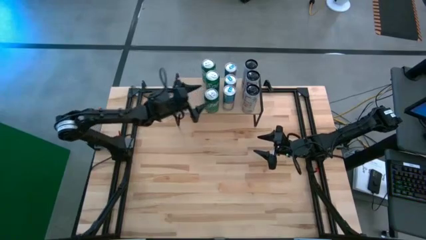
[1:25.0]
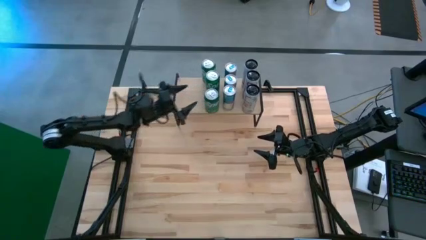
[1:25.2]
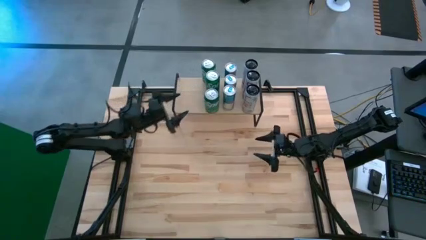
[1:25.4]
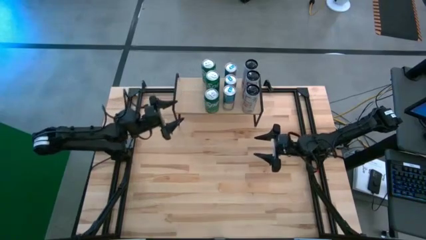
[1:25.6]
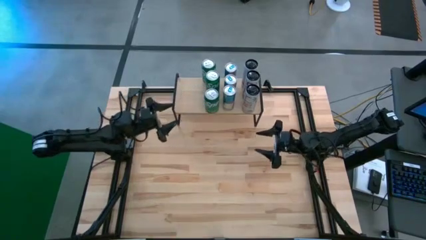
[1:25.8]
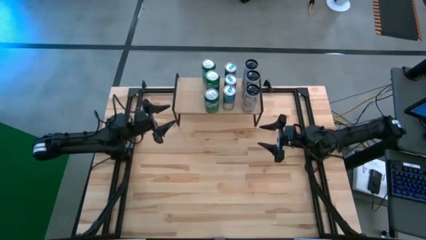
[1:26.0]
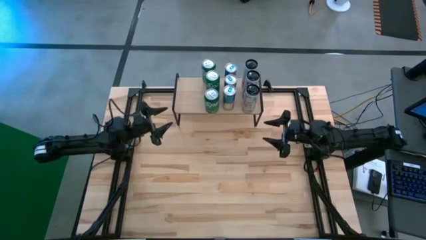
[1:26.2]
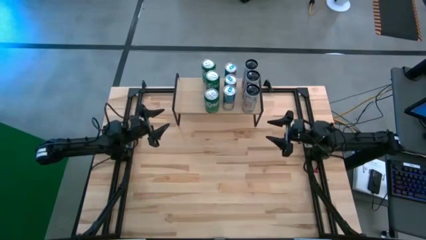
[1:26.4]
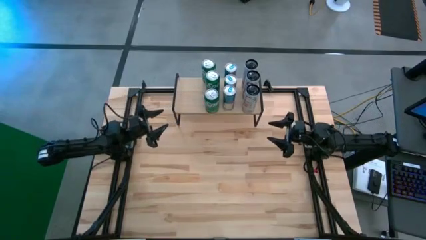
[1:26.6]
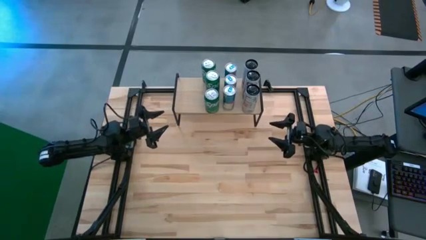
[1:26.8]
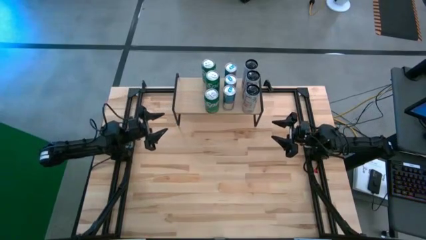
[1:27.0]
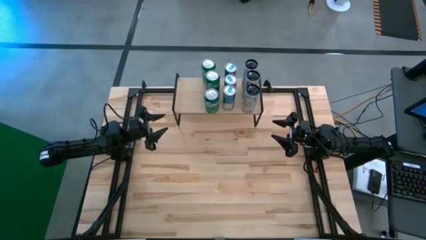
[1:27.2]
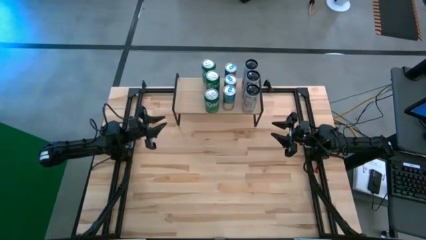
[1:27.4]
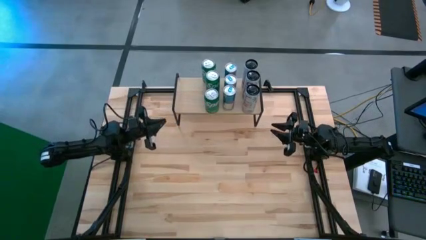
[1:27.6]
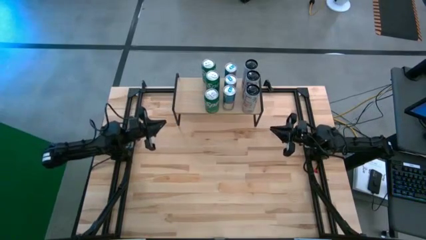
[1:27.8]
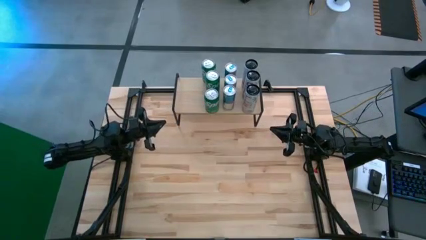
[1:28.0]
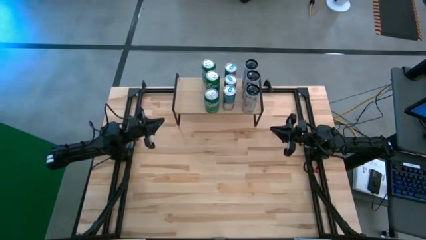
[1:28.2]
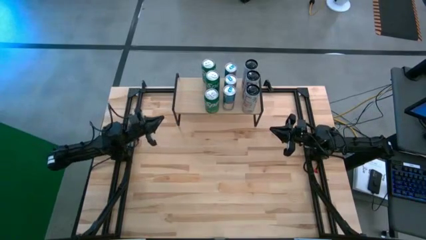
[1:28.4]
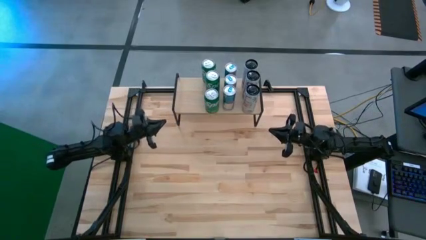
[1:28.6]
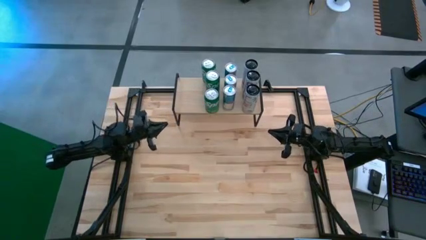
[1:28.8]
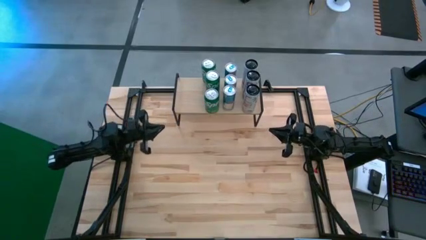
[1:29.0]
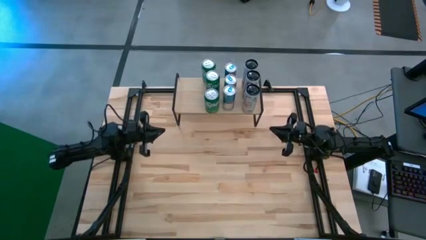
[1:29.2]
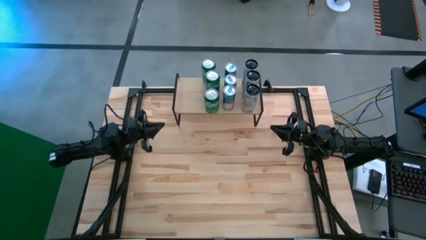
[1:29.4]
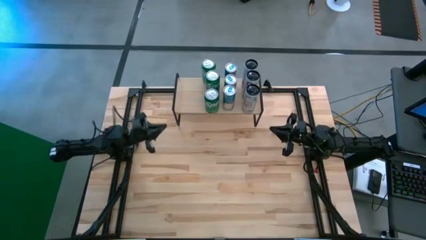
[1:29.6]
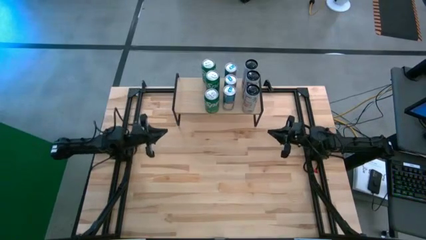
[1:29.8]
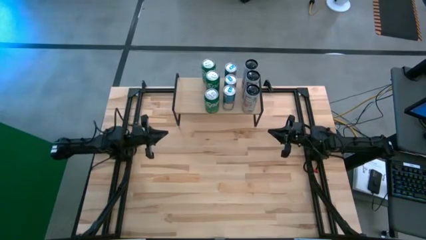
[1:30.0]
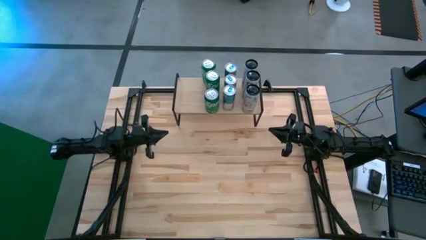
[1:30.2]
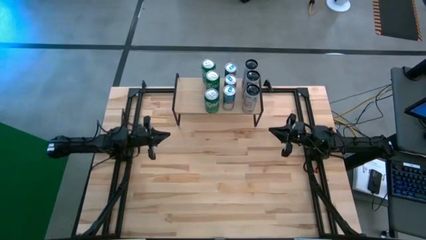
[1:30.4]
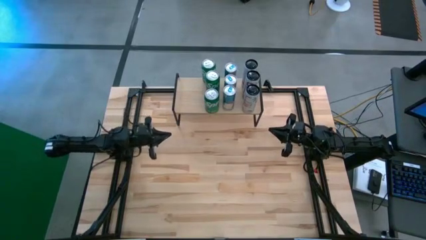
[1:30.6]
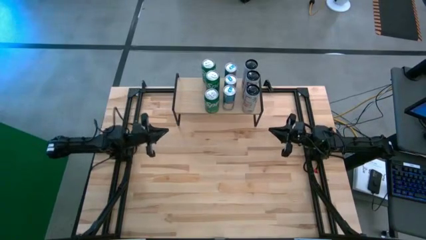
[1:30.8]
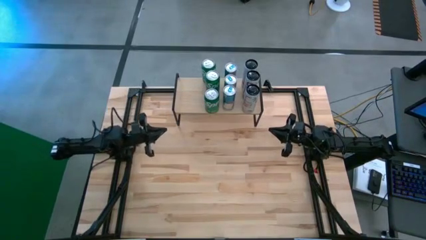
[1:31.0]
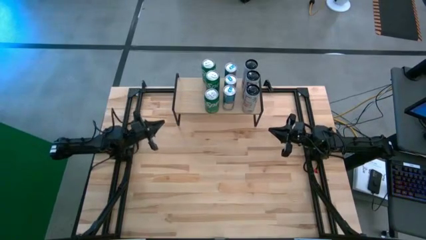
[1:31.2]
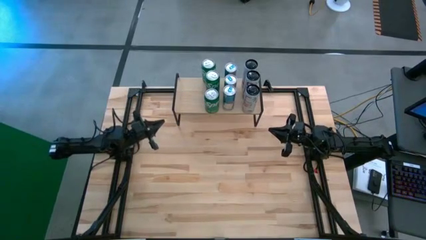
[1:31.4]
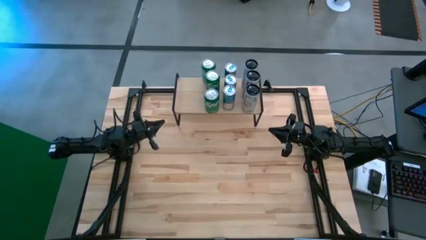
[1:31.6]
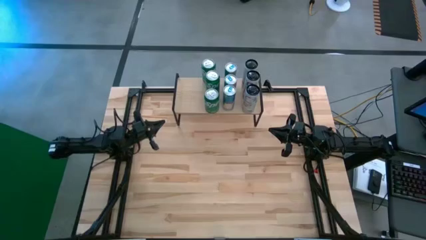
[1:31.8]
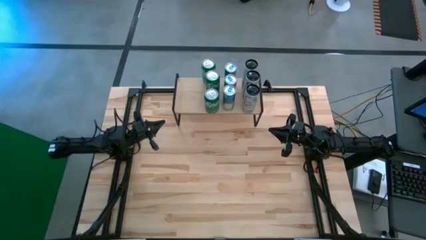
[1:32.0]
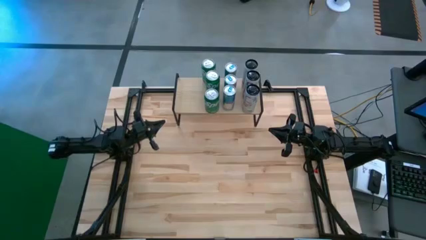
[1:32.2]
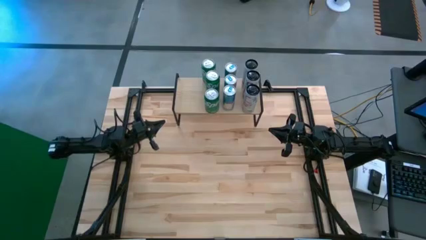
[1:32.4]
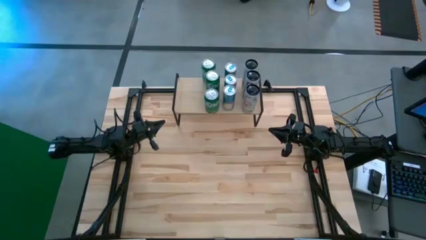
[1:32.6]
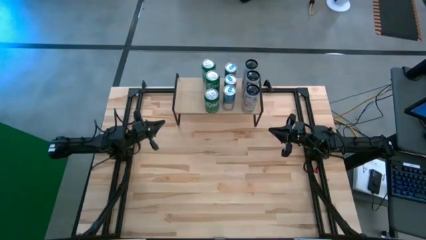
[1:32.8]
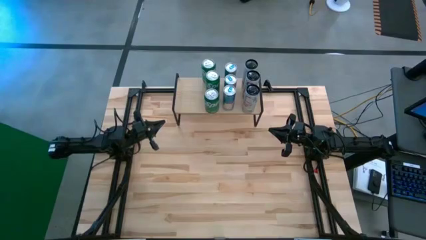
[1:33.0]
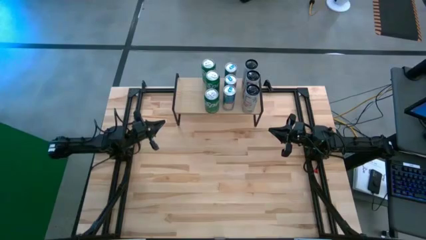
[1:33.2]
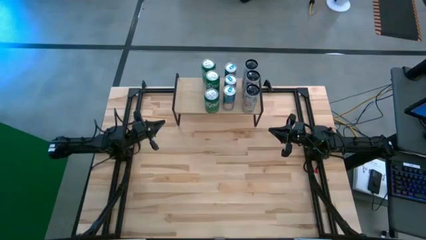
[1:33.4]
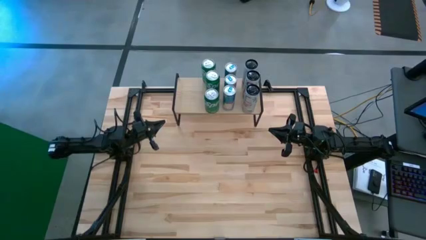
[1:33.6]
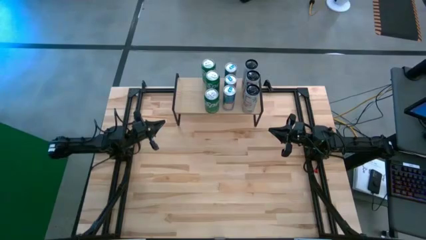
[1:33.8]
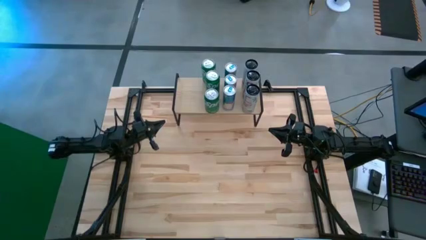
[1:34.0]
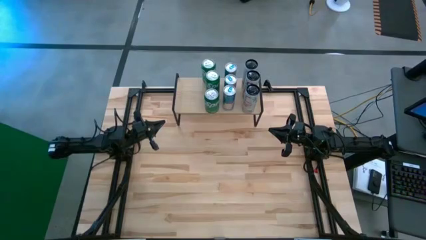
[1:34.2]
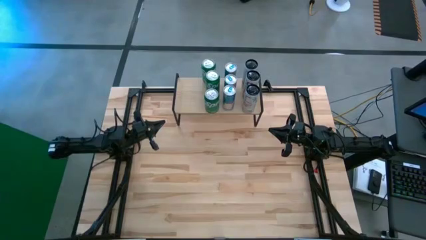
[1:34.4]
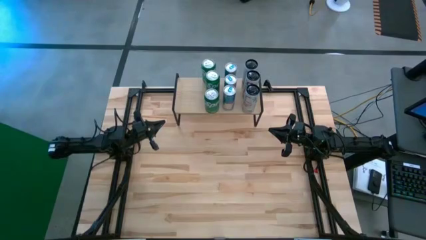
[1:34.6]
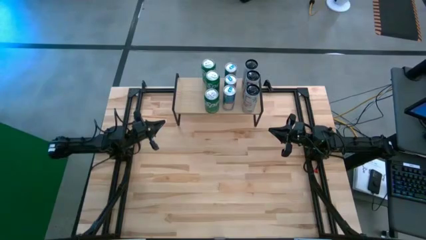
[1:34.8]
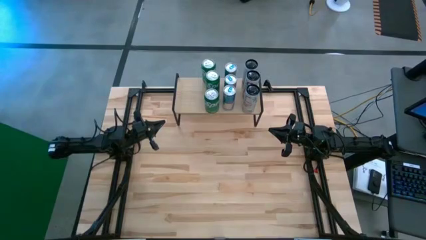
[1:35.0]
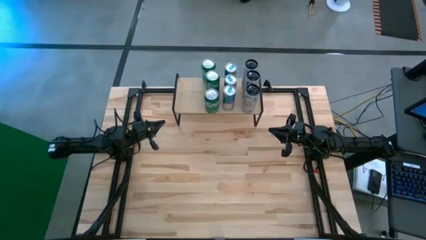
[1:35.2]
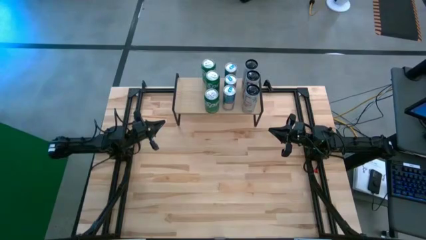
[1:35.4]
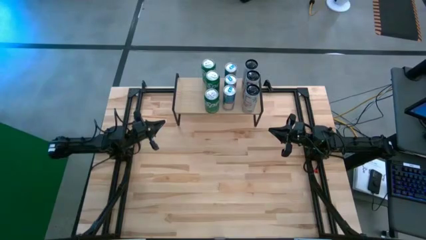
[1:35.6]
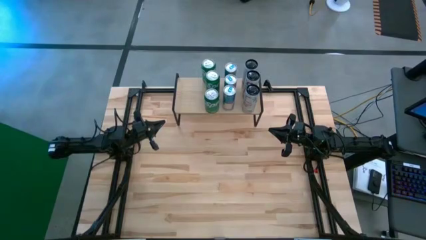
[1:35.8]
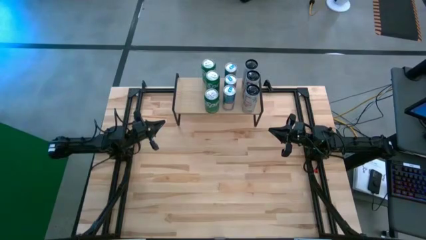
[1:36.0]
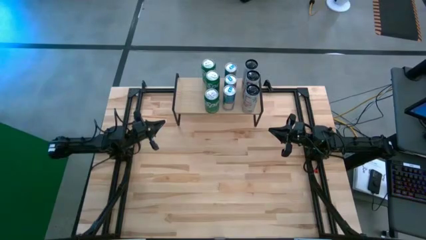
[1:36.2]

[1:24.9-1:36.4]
Task: Place canned beverage on shelf
Return to Home Position

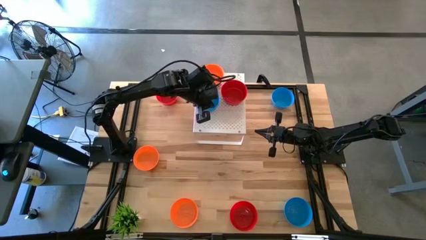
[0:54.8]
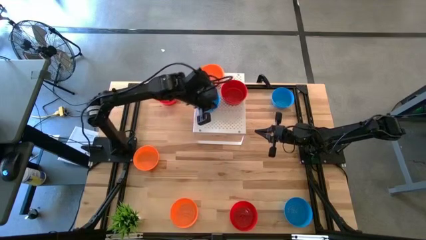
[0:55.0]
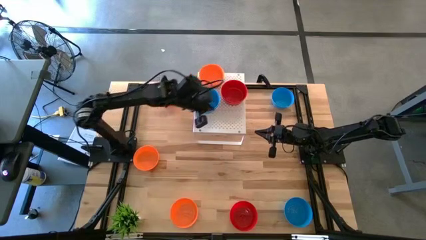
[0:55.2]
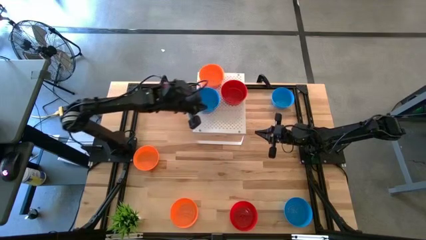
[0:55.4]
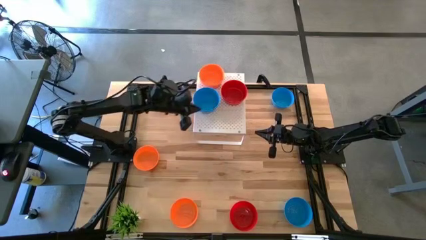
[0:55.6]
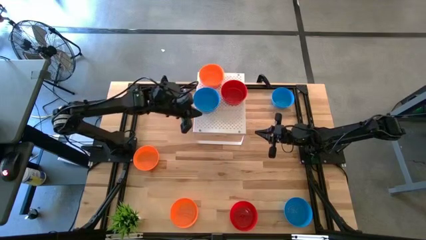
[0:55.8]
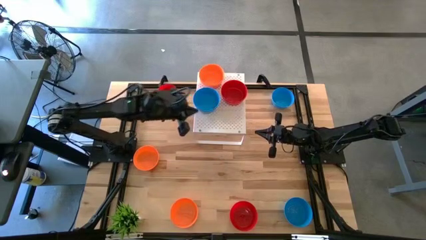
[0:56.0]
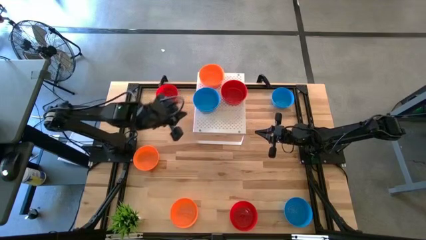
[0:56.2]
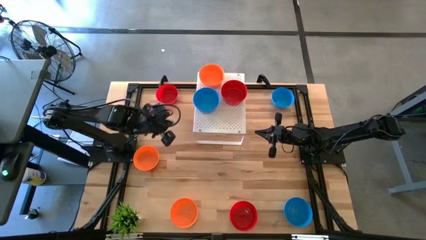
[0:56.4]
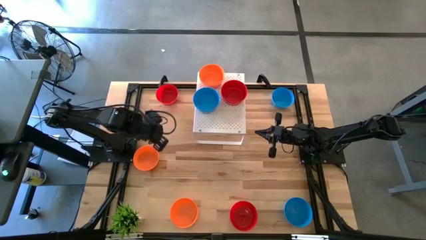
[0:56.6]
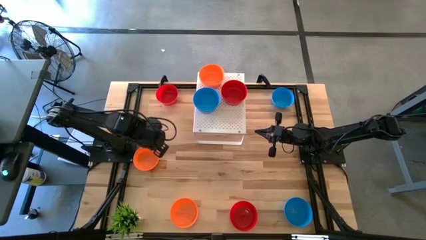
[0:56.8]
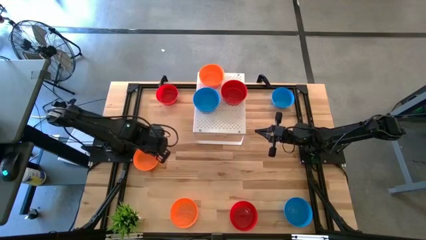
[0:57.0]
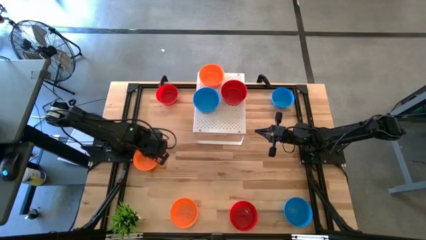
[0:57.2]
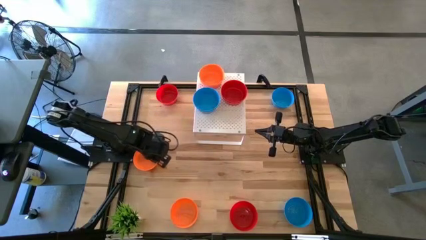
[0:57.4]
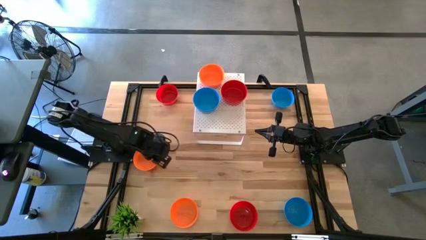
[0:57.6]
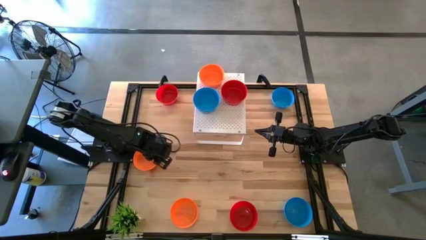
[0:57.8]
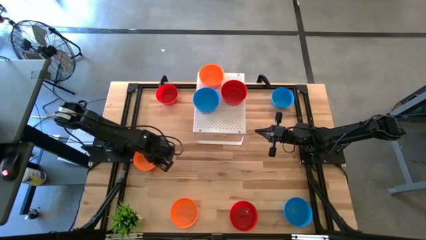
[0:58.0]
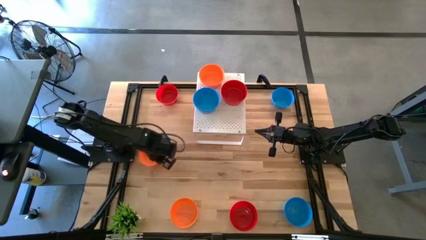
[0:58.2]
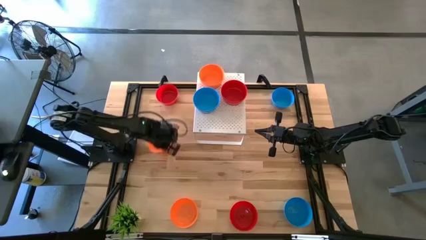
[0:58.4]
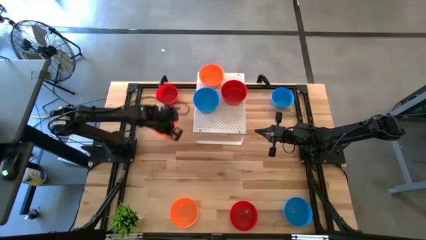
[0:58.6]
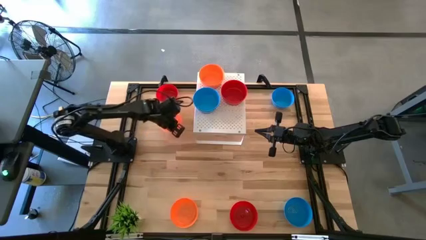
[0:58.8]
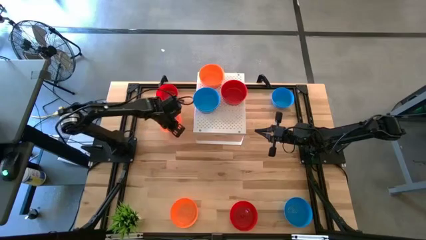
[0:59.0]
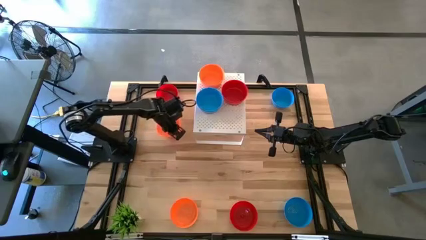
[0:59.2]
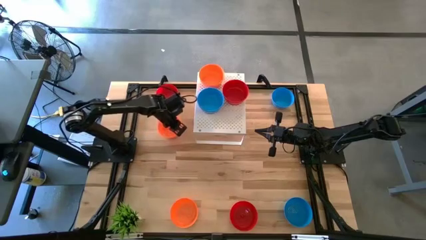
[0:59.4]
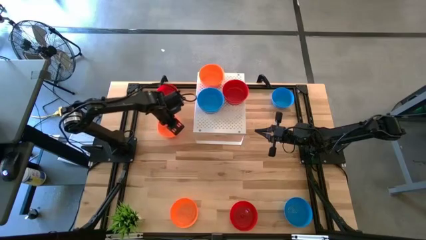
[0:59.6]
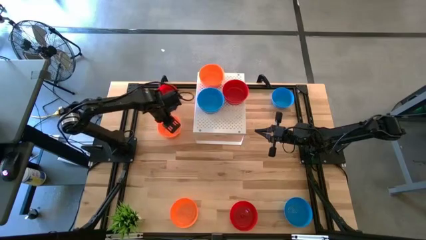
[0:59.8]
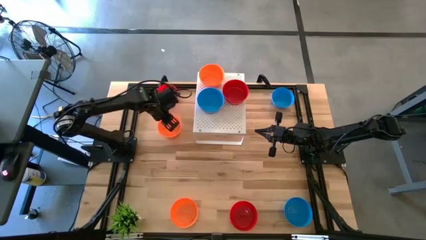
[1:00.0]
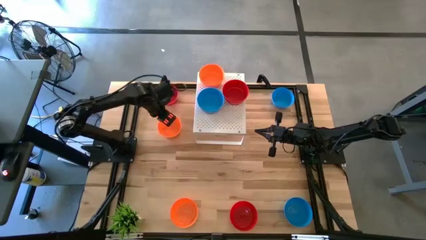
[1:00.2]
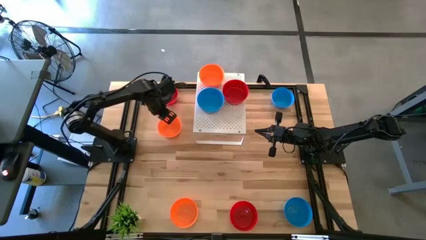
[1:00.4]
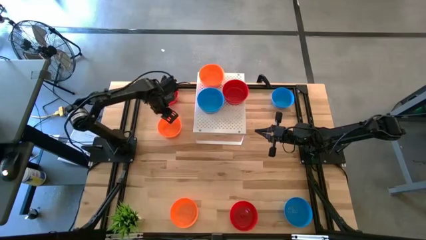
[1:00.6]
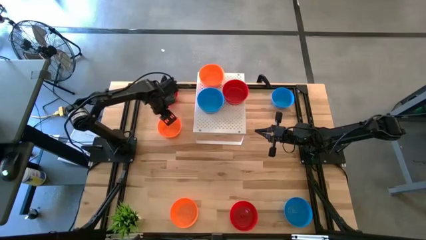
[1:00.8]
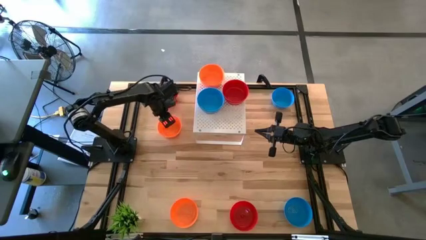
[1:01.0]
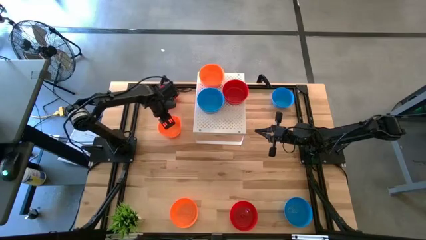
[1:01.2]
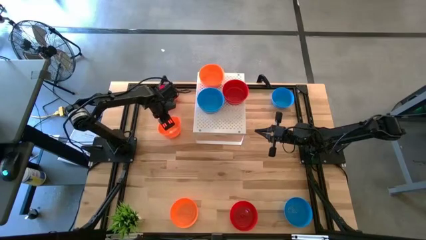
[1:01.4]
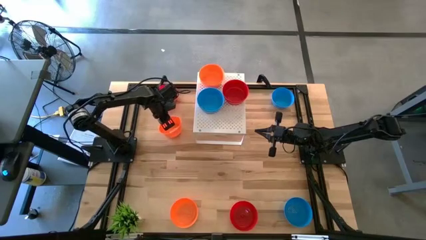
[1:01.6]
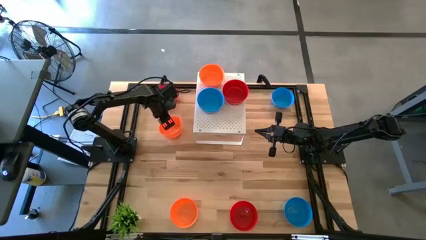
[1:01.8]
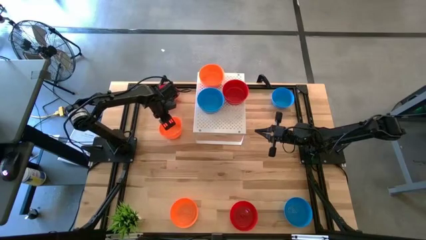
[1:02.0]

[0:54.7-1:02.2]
Task: Pick & Place Mini bowls
Stack the orange bowl on top of the orange bowls on the shelf
